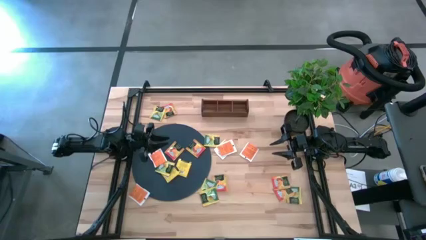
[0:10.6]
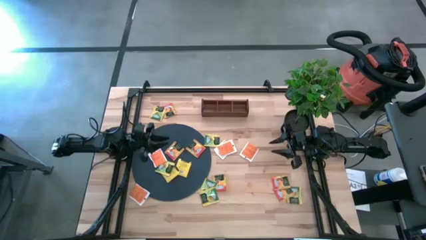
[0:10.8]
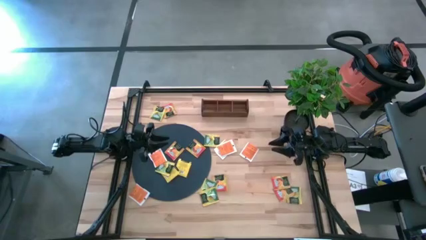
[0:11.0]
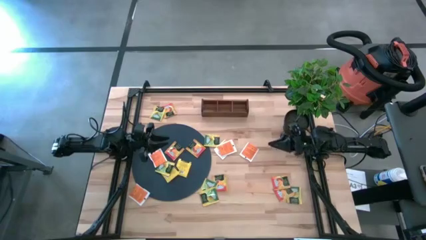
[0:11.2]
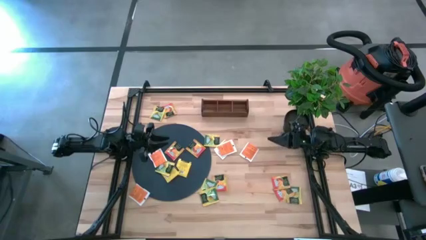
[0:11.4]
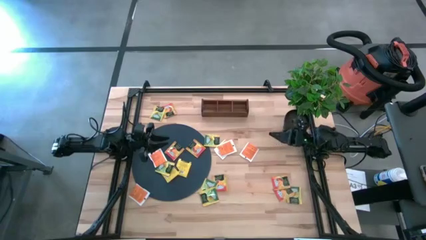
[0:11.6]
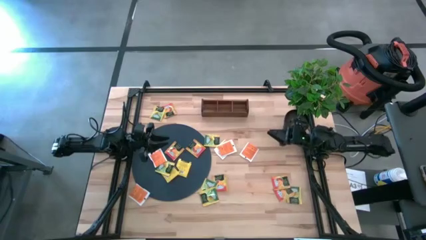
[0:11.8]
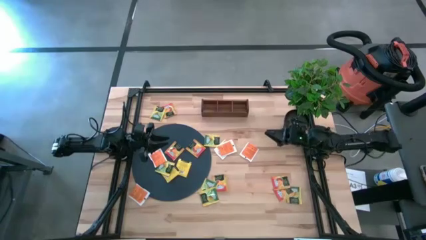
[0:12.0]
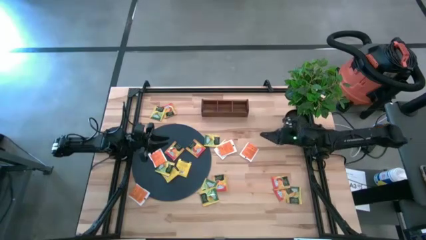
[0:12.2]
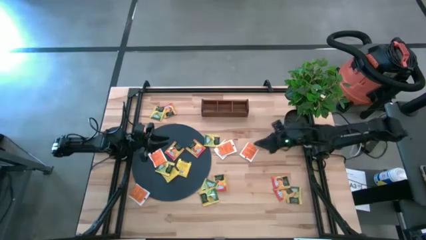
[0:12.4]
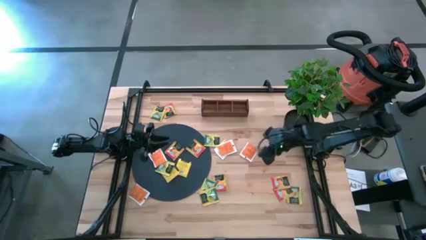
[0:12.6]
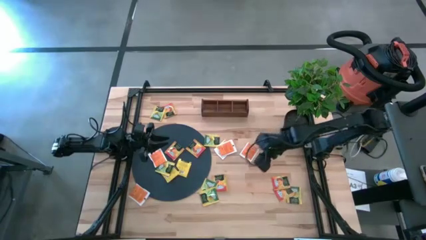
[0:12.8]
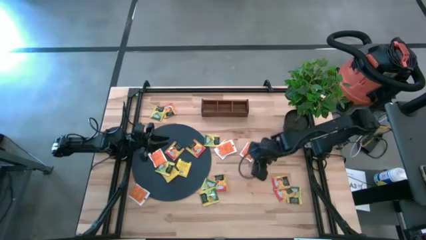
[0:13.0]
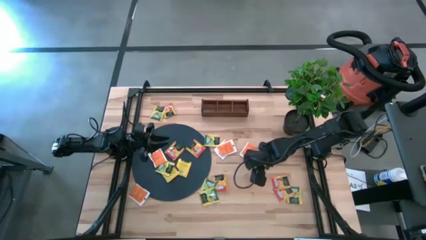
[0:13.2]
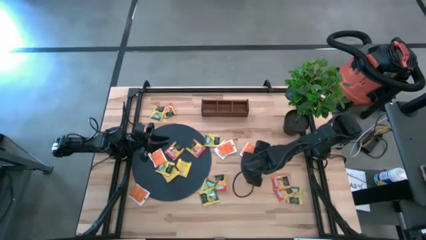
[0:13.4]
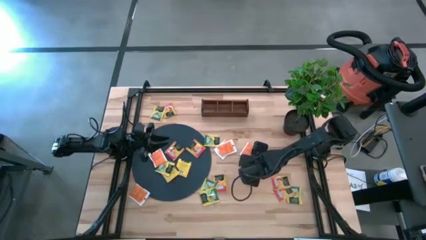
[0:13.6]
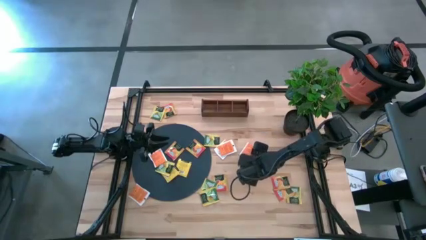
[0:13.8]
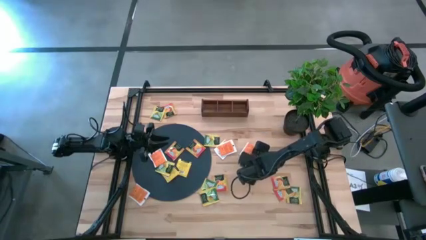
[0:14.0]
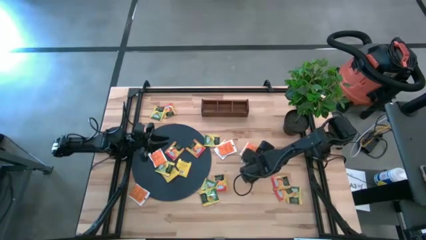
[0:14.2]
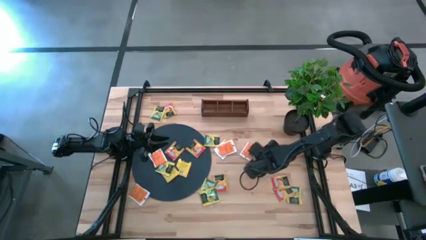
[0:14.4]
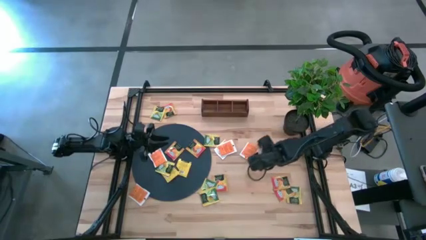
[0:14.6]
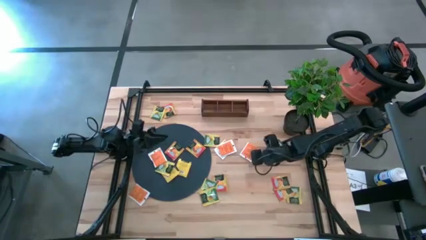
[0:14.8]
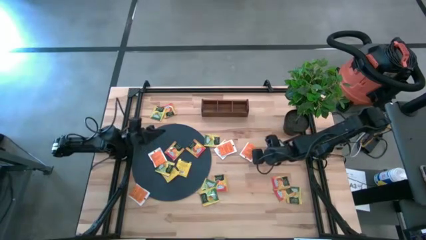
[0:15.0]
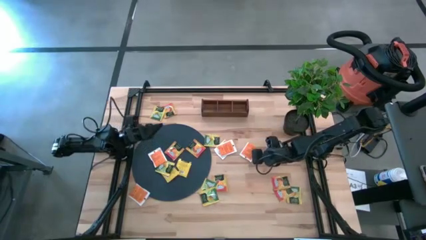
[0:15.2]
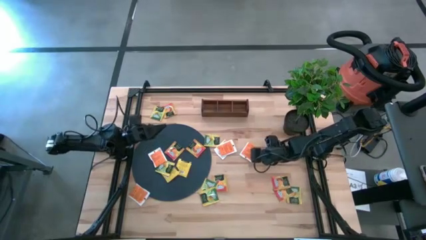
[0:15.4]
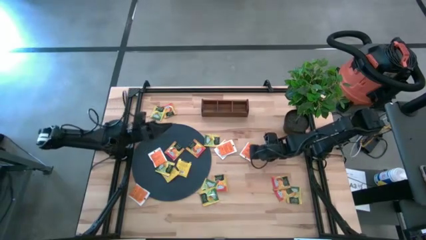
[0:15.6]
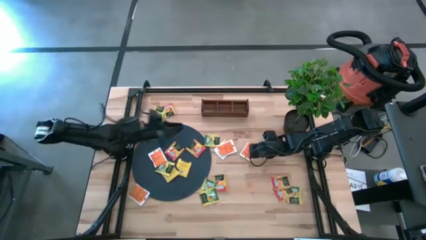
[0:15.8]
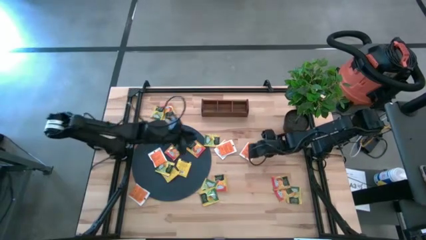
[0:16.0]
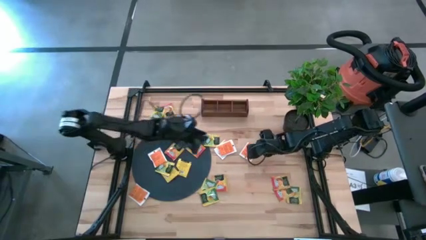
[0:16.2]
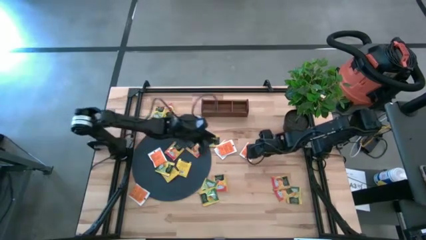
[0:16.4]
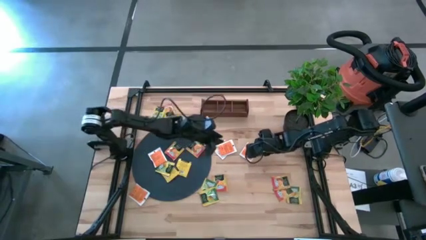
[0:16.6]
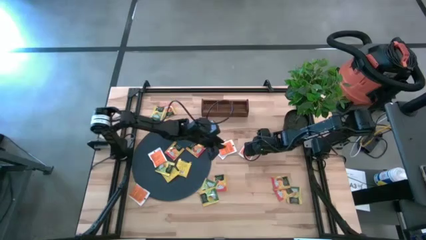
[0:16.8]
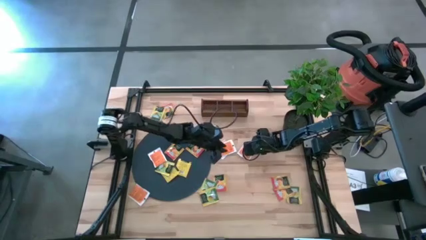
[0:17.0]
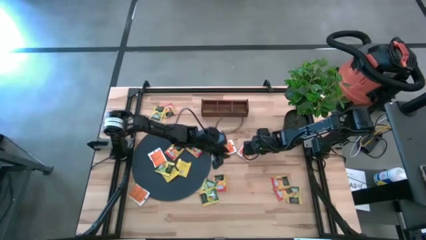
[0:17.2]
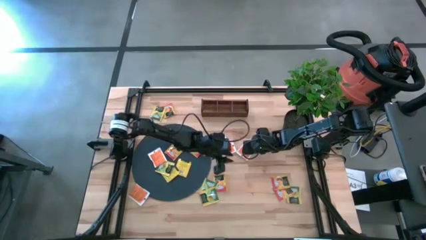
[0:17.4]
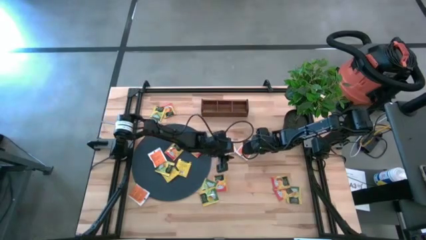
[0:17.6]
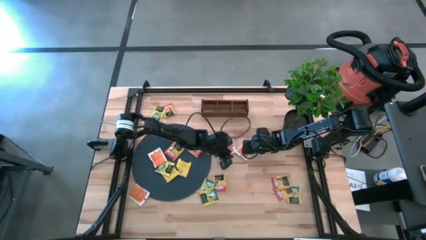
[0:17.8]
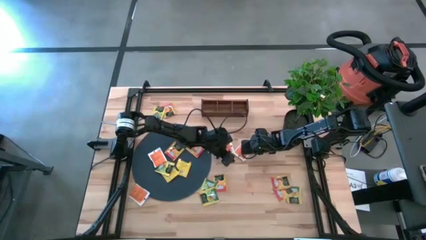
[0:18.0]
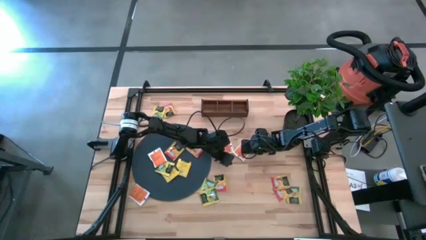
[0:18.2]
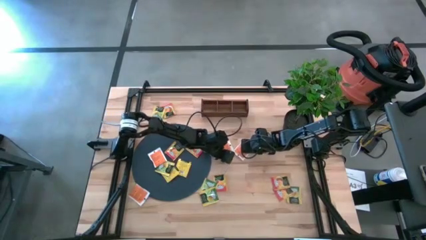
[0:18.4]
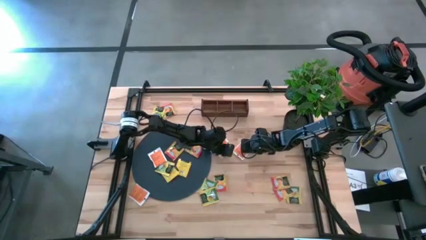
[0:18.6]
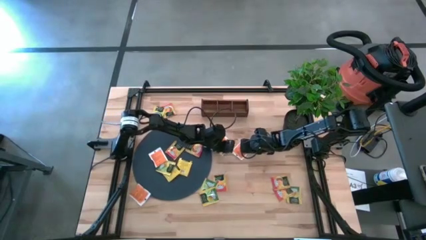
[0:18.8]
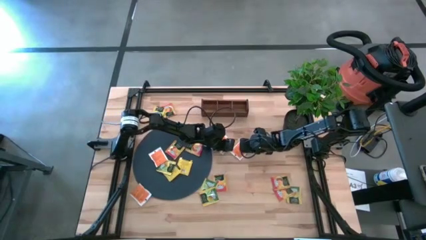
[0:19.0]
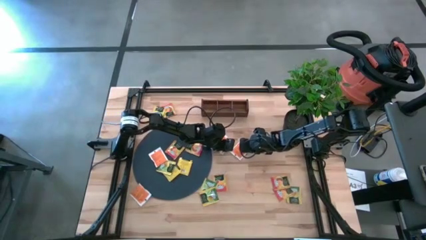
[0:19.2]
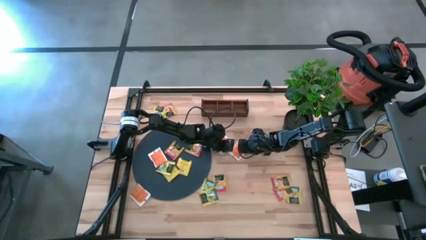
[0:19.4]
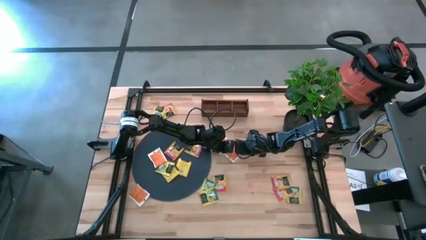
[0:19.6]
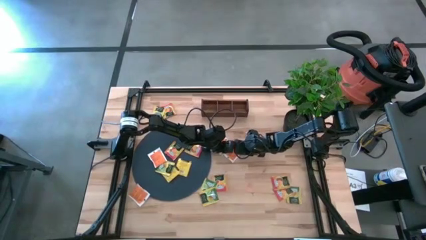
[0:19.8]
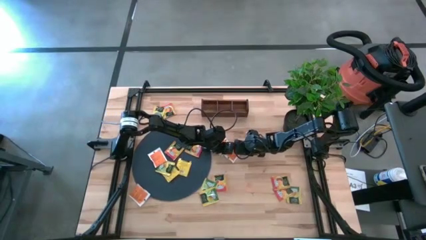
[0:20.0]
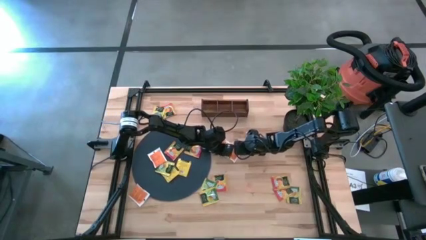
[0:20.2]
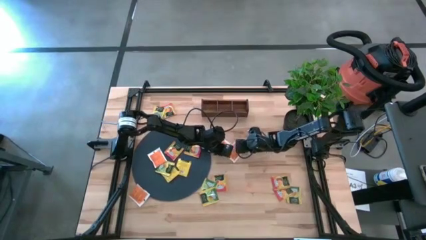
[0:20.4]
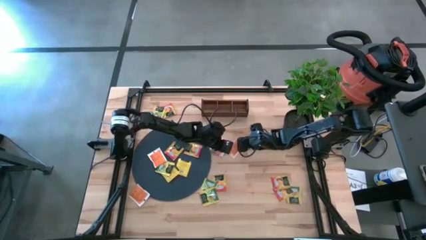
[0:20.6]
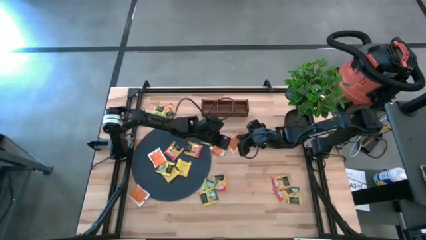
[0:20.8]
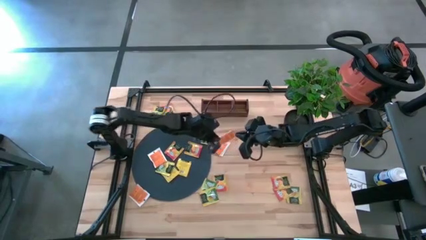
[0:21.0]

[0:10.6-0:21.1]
Task: Pick & Place Tea
Put the orange tea bag into the left section of the wooden organizer

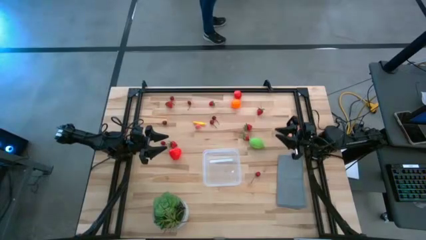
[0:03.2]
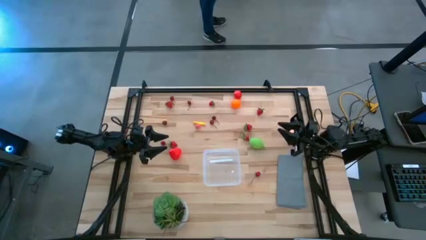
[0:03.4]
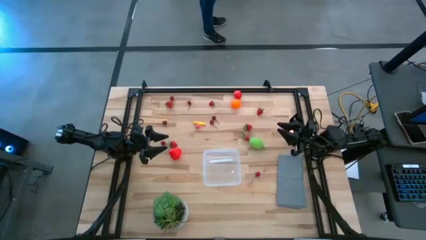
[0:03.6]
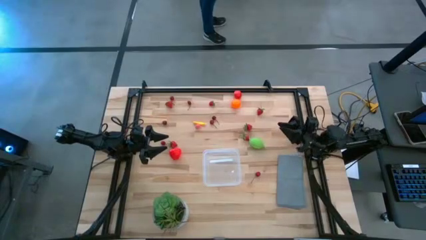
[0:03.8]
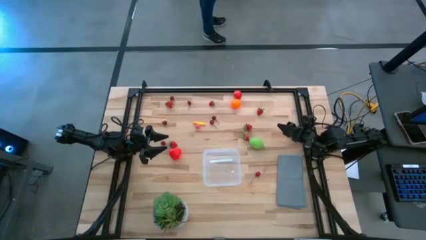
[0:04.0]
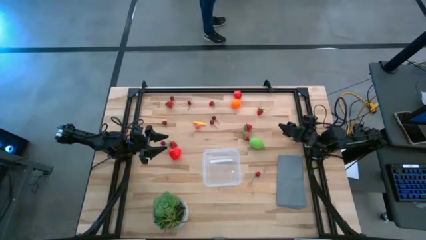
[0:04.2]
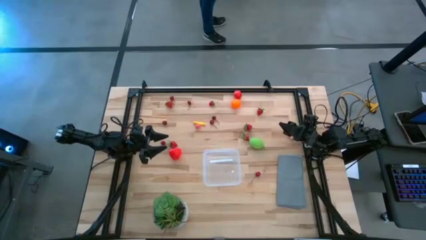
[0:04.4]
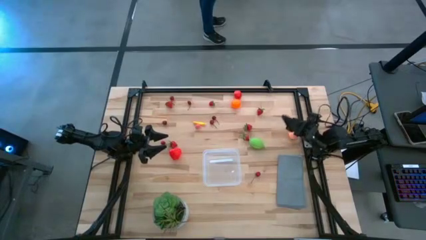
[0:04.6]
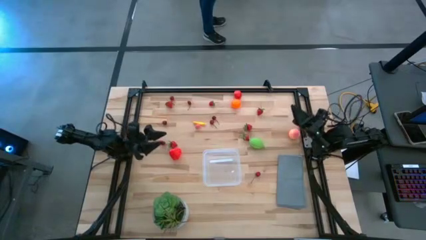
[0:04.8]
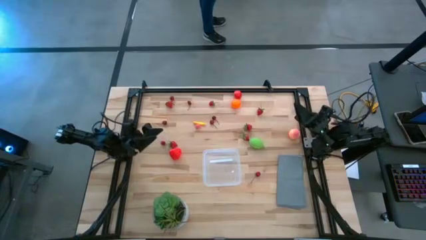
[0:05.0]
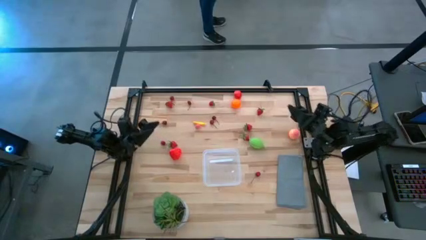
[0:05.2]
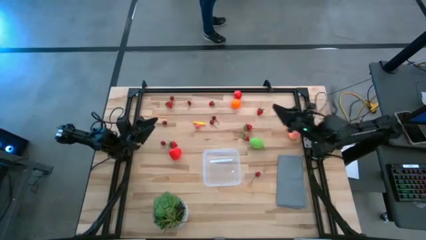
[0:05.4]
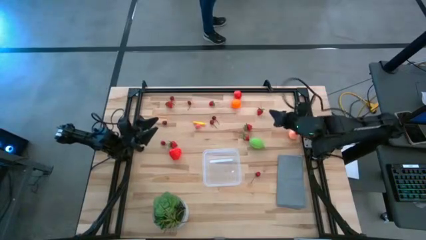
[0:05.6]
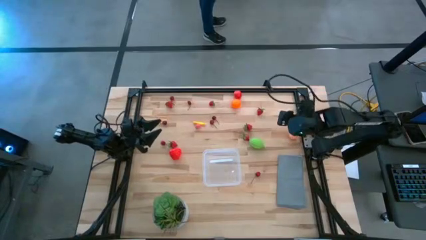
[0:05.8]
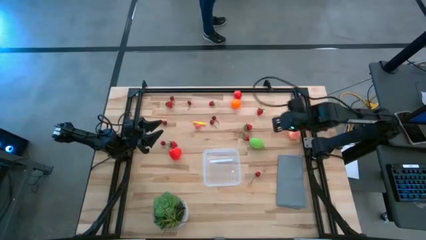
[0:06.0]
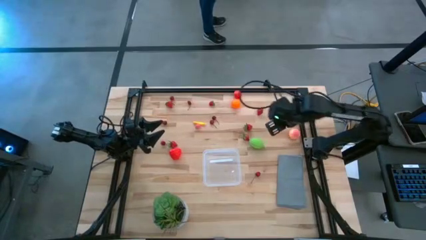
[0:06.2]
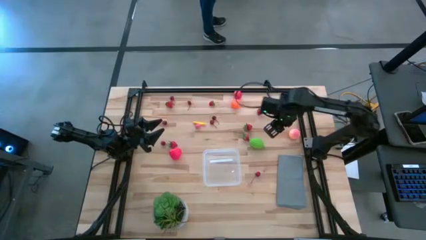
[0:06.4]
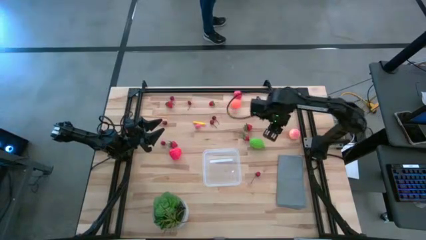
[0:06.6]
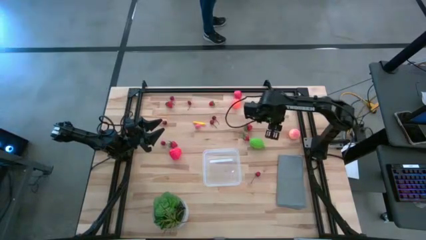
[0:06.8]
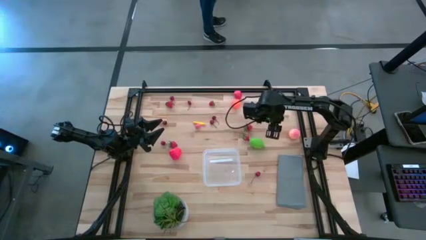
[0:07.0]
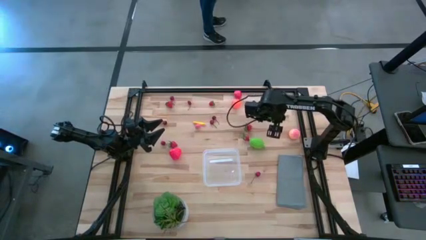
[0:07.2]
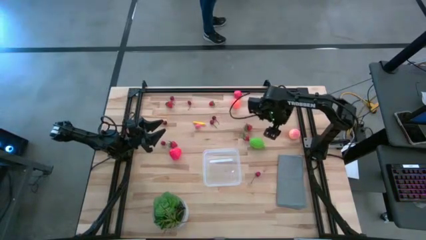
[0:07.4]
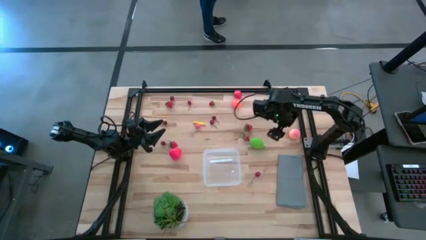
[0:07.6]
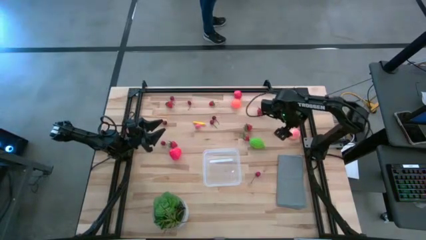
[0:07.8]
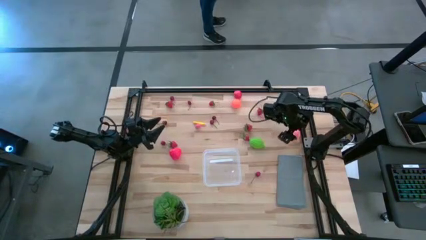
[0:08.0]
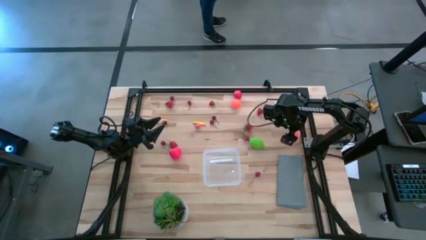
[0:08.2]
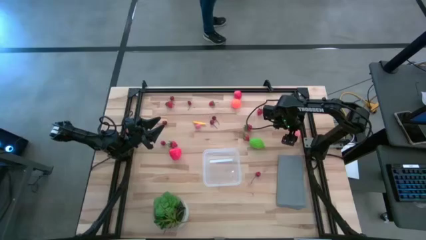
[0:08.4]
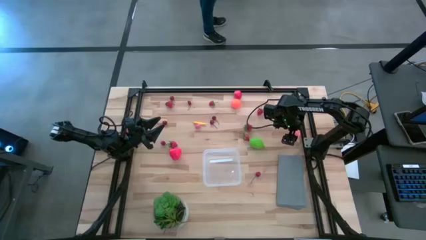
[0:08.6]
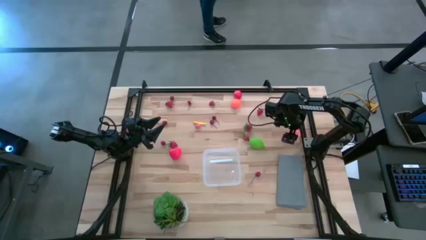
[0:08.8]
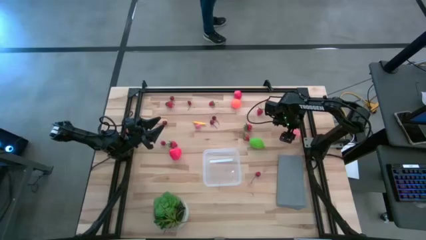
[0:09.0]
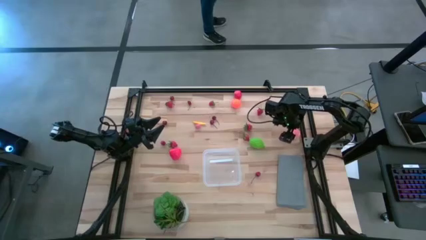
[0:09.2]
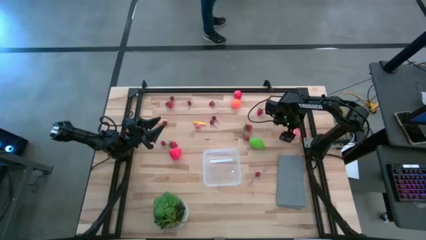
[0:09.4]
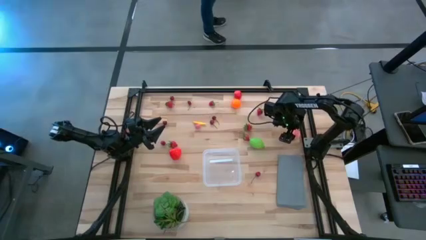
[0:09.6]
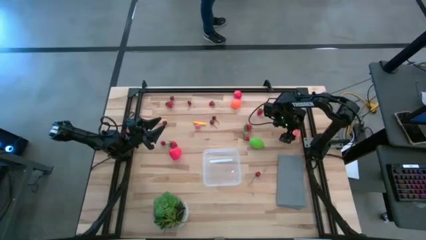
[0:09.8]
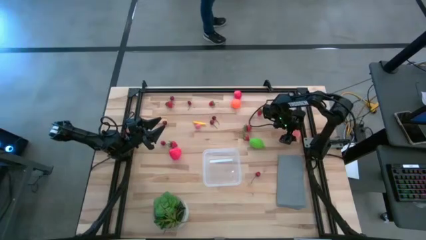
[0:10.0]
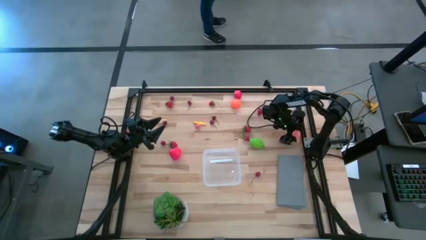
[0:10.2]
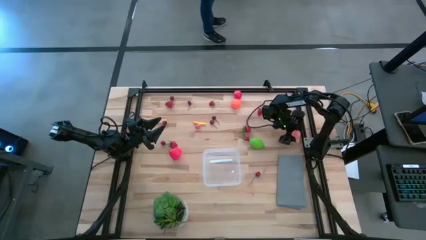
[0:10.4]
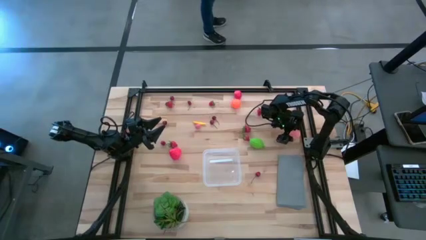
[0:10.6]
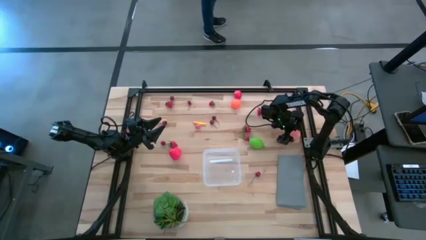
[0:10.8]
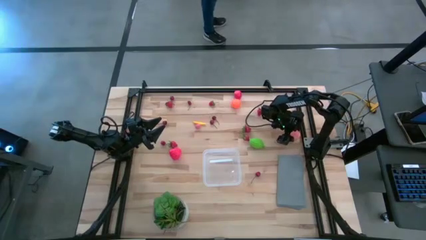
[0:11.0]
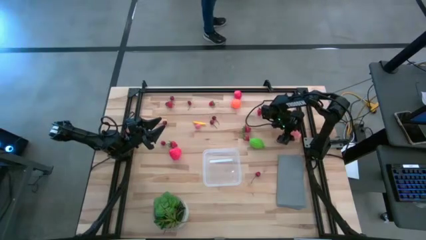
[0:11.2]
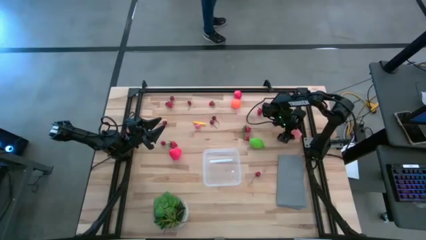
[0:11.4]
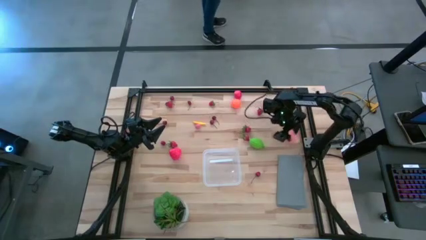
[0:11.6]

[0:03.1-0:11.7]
Task: Pick and placing Produce into tupperware
Put the pink peach into the transparent bin
